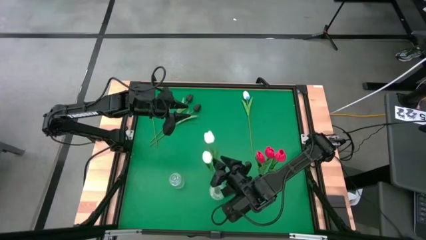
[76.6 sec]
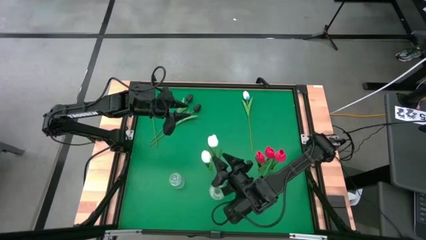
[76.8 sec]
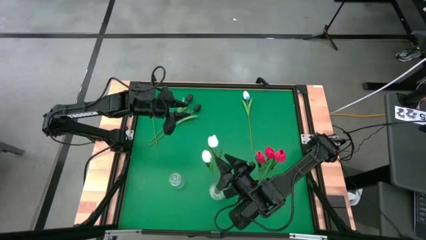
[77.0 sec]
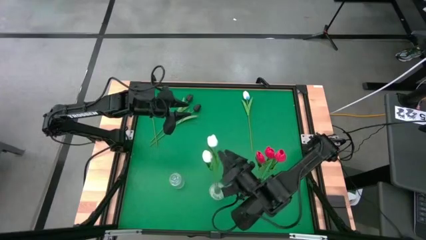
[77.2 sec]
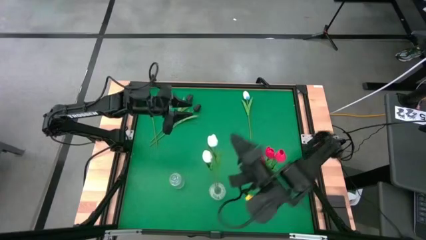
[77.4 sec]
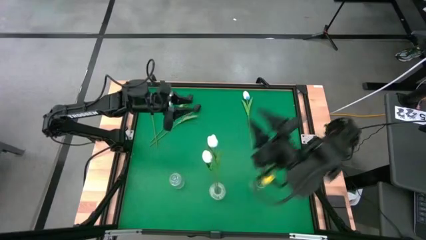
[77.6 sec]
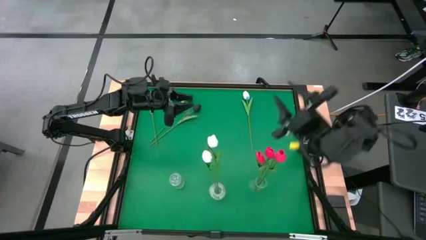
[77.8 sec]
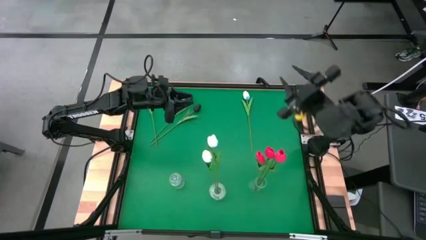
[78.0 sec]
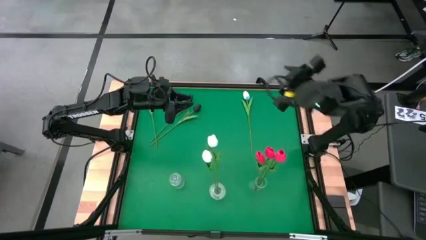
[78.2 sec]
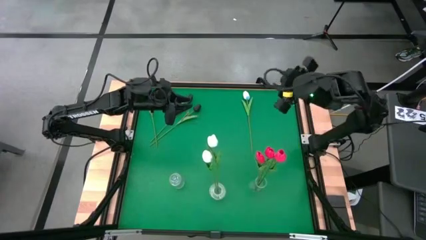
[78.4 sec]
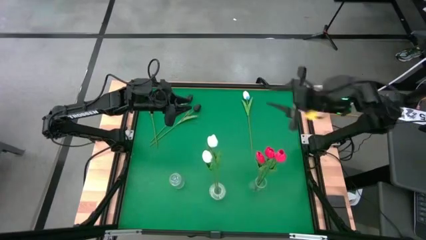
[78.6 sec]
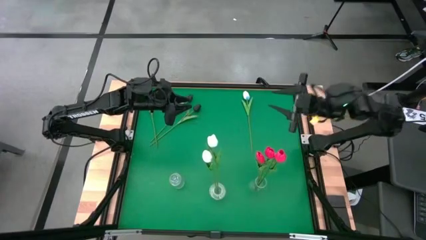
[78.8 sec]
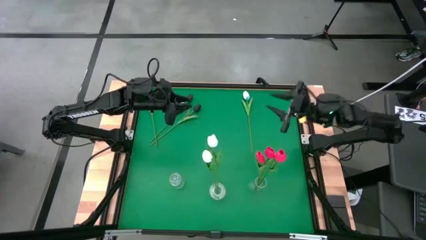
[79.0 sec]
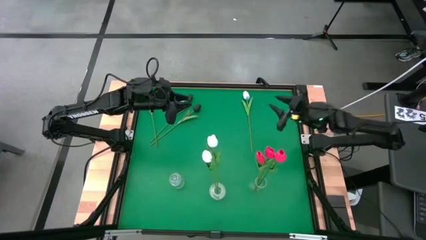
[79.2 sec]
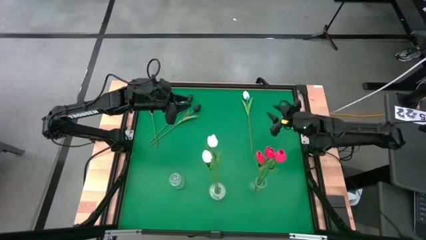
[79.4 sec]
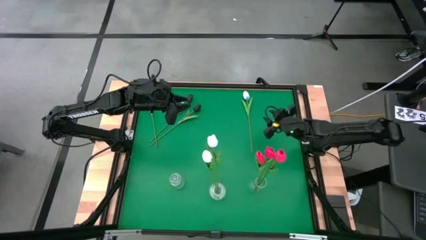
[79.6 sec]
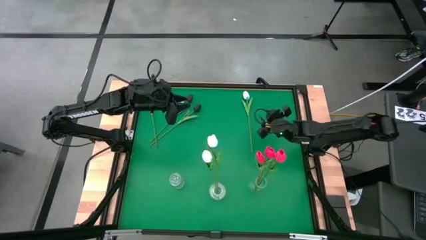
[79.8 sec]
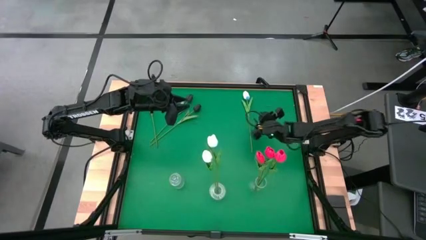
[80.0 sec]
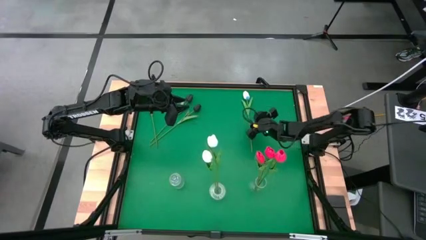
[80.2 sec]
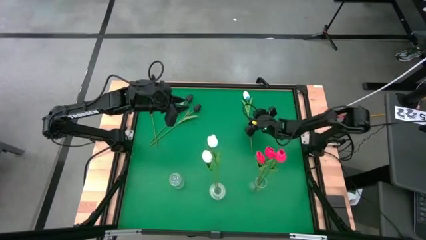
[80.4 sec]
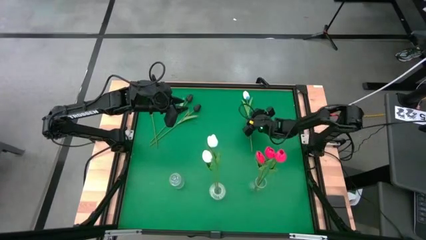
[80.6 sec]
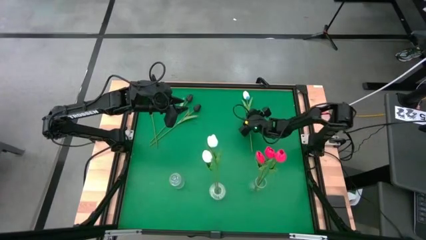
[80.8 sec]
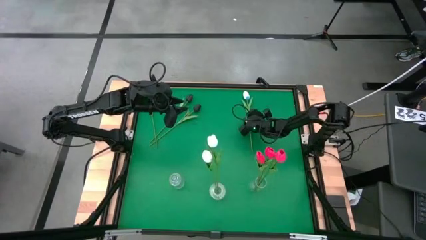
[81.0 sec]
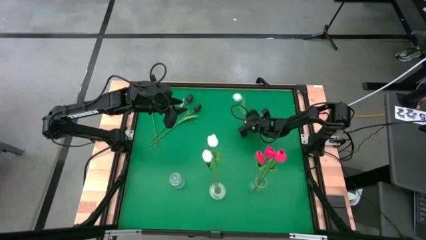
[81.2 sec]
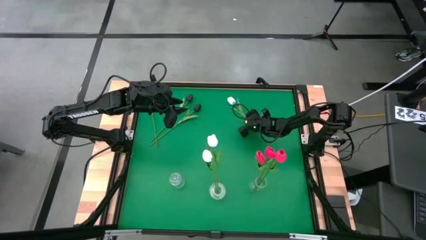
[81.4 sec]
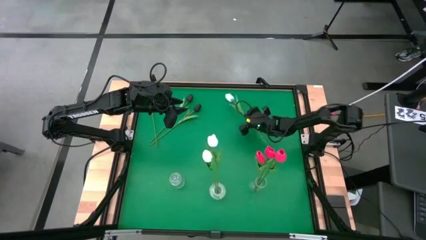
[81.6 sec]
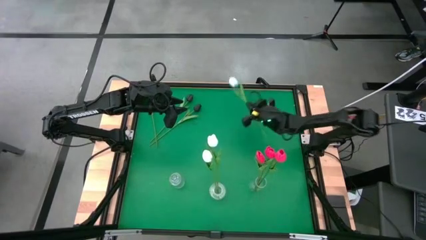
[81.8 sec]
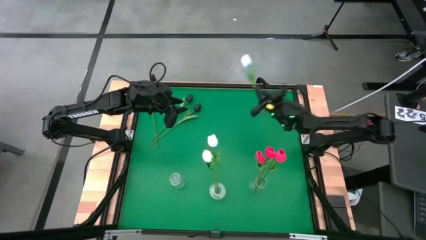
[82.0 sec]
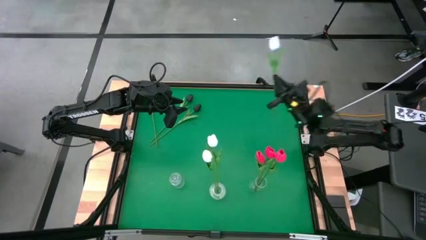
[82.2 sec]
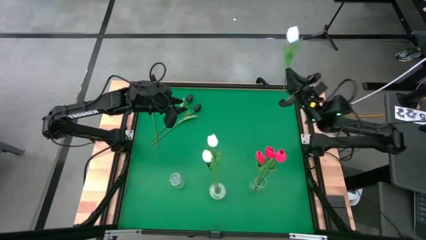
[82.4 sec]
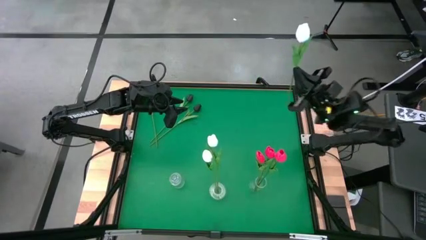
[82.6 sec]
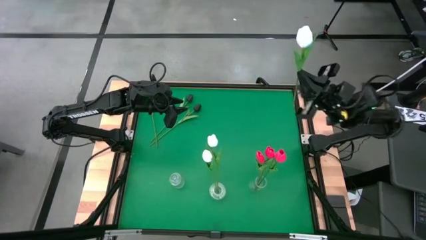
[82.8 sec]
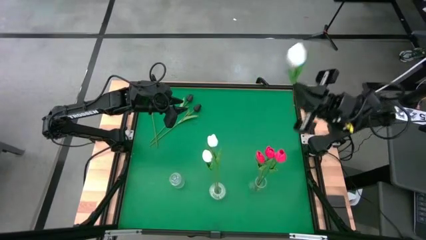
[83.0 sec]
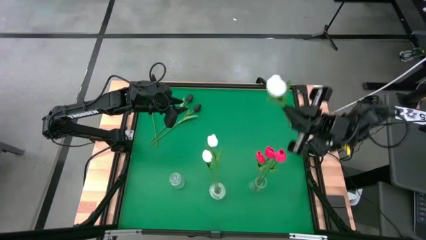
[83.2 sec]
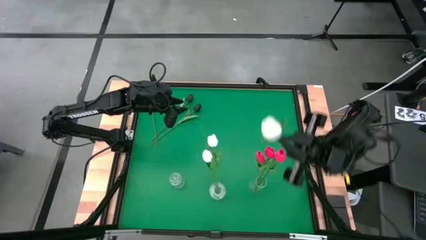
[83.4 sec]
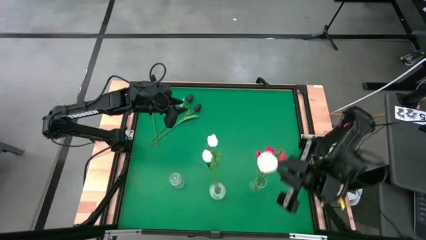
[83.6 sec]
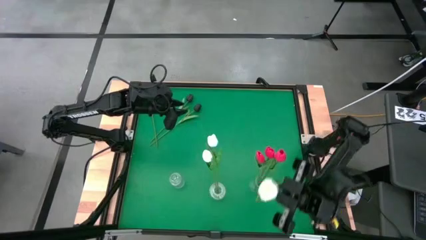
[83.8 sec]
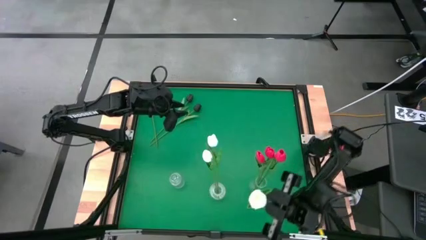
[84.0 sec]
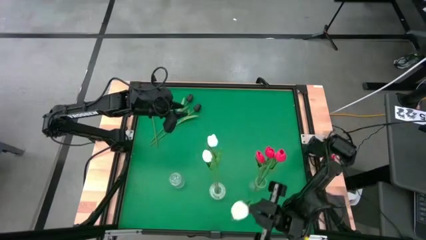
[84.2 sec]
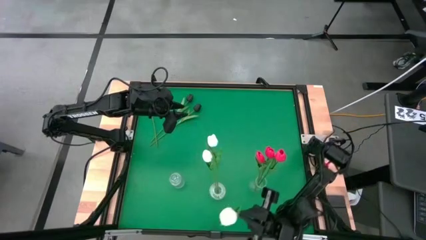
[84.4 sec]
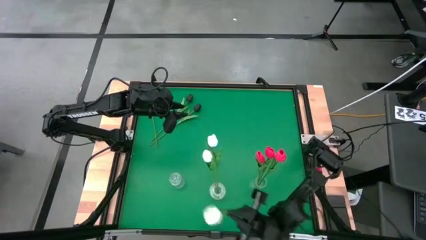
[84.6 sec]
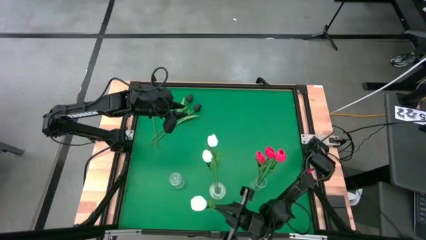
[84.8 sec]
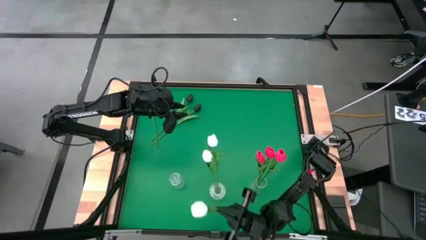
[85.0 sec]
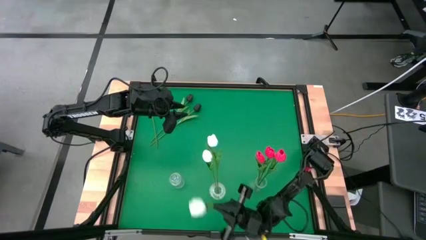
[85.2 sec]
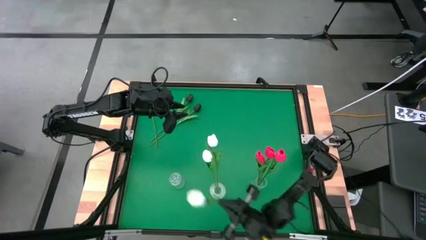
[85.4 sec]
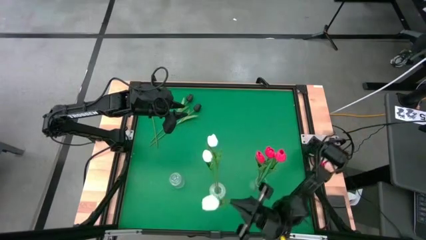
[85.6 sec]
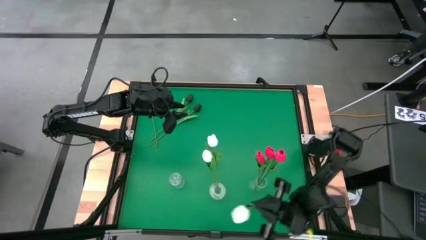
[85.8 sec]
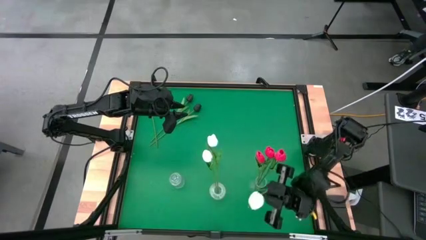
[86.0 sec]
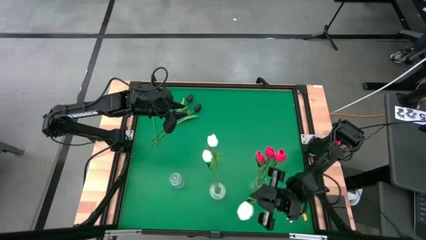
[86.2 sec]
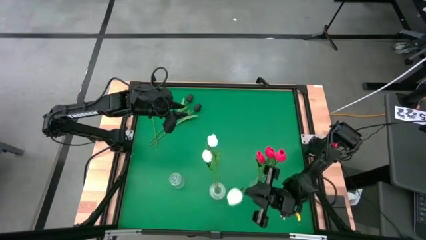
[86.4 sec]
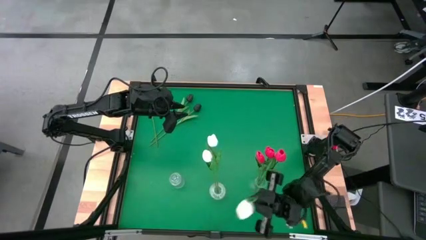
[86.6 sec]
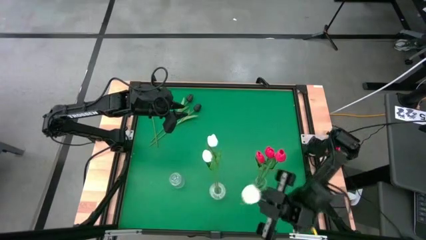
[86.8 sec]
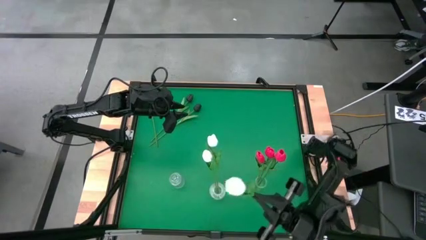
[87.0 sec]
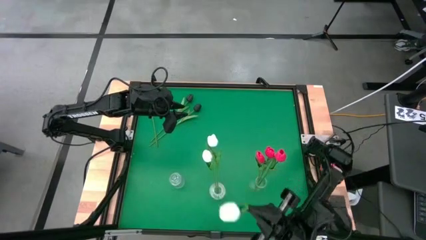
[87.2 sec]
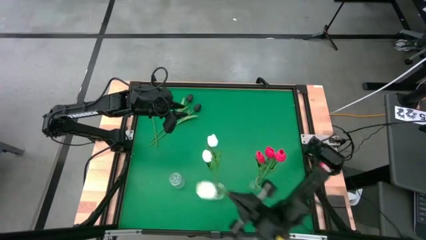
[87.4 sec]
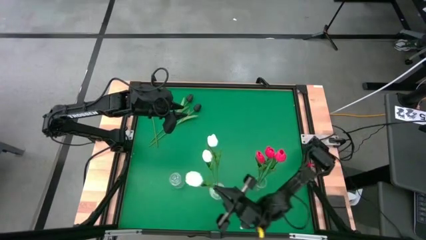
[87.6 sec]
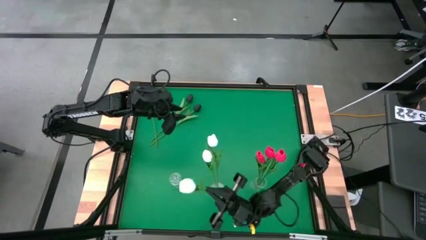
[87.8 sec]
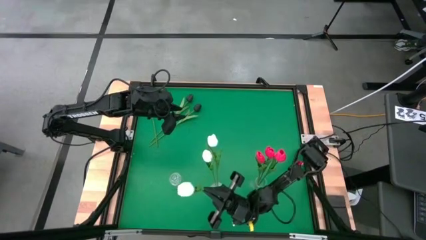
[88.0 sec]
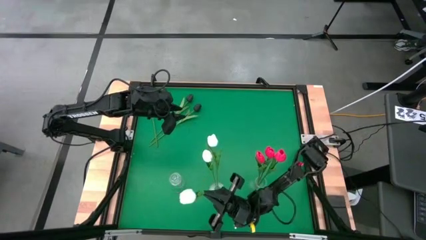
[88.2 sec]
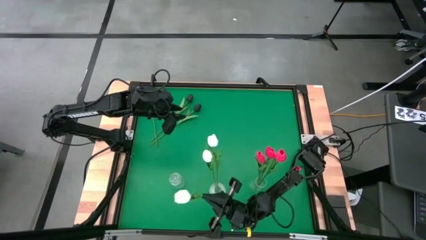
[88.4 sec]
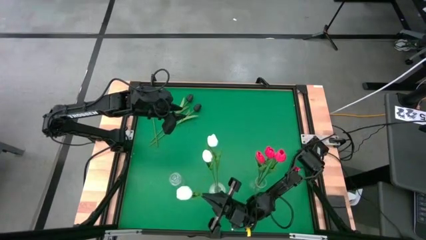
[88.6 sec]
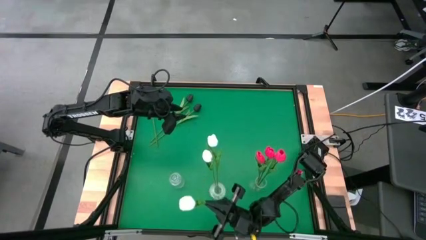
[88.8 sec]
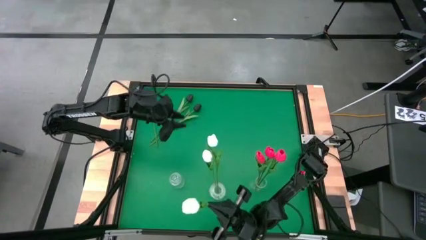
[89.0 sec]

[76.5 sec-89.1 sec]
Task: Sort flowers into vase by color
Put the white tulip into the middle transparent vase

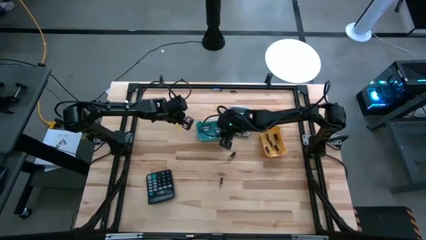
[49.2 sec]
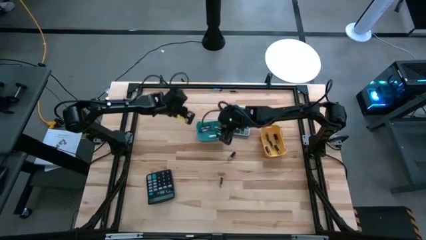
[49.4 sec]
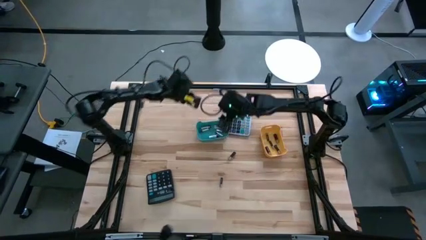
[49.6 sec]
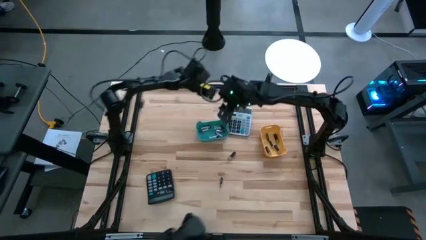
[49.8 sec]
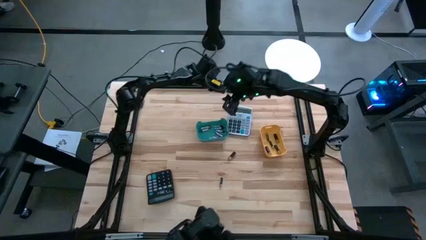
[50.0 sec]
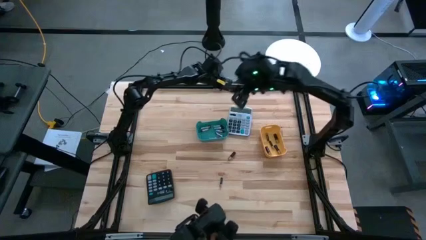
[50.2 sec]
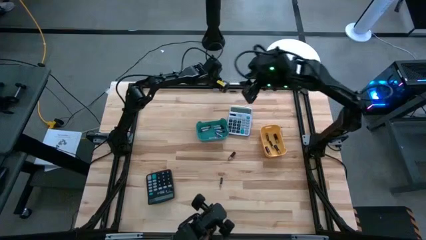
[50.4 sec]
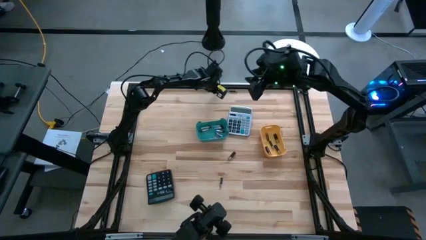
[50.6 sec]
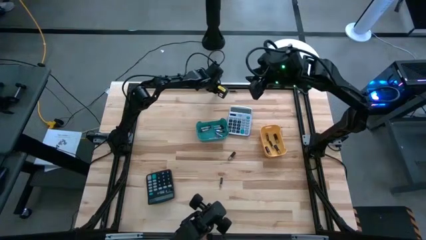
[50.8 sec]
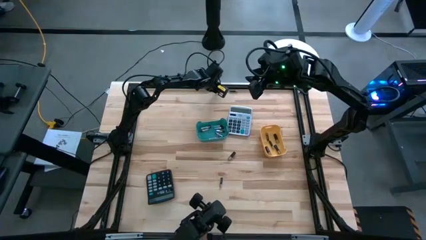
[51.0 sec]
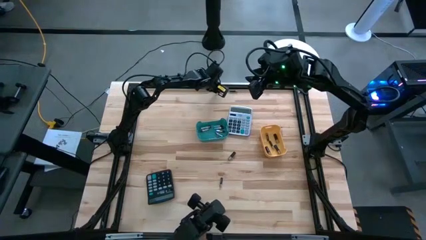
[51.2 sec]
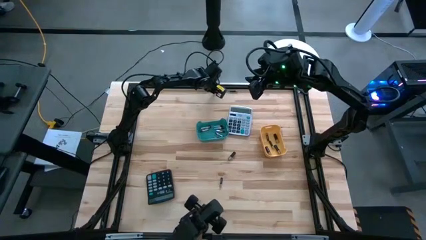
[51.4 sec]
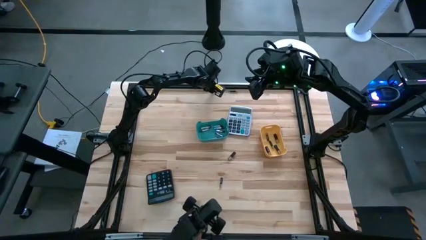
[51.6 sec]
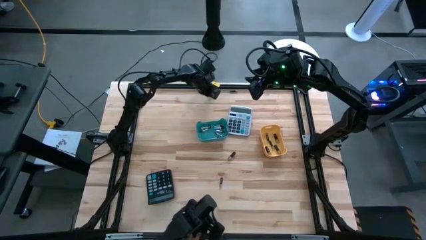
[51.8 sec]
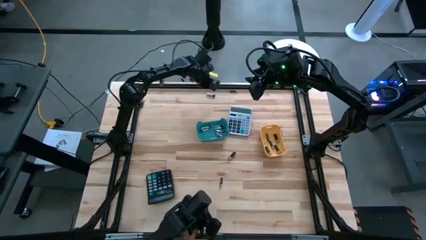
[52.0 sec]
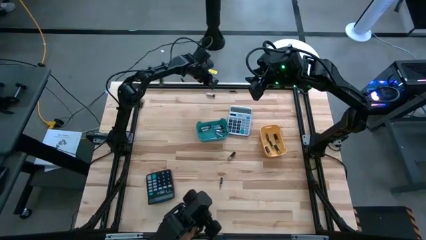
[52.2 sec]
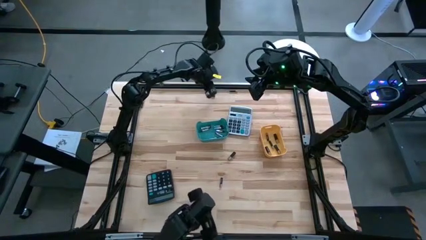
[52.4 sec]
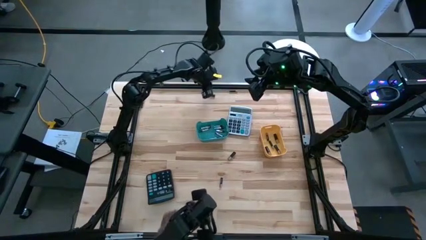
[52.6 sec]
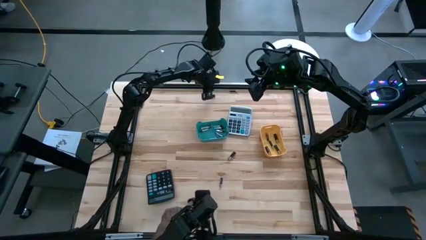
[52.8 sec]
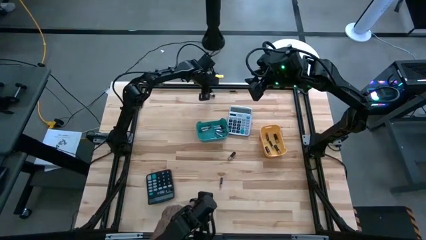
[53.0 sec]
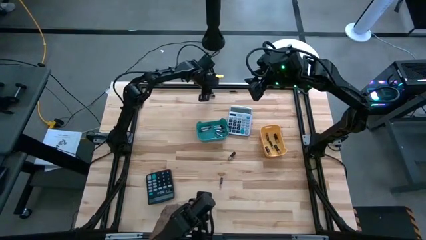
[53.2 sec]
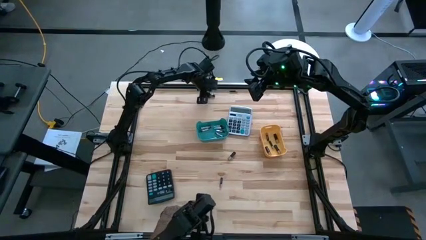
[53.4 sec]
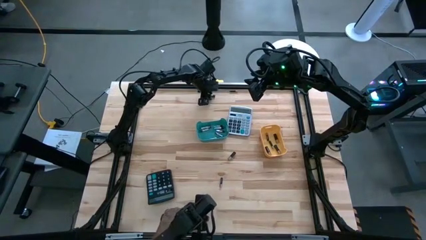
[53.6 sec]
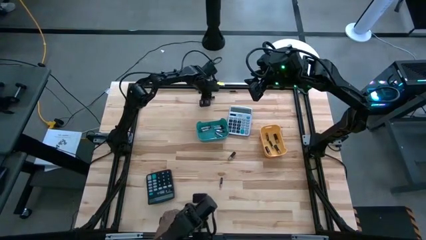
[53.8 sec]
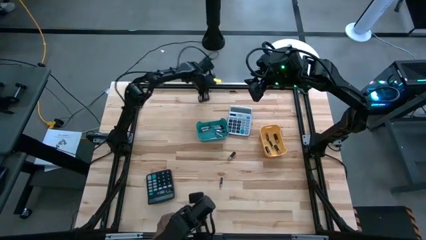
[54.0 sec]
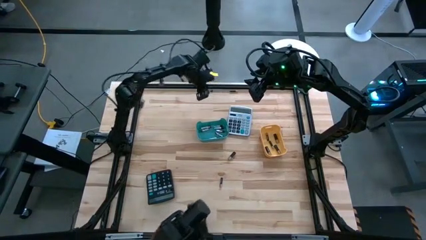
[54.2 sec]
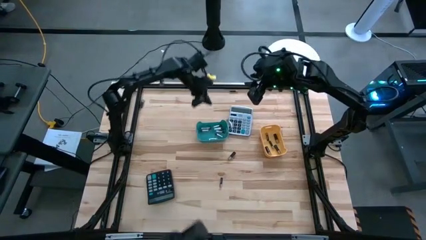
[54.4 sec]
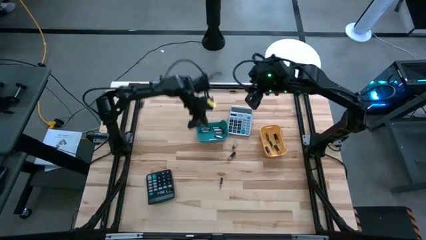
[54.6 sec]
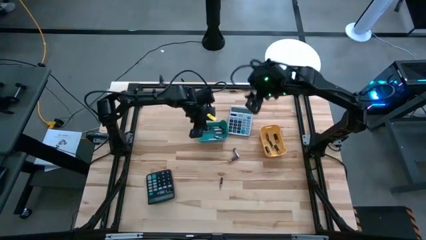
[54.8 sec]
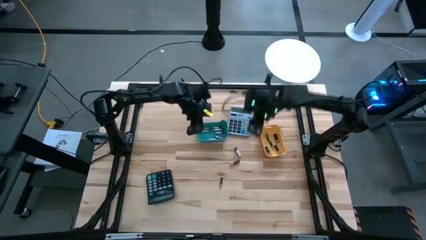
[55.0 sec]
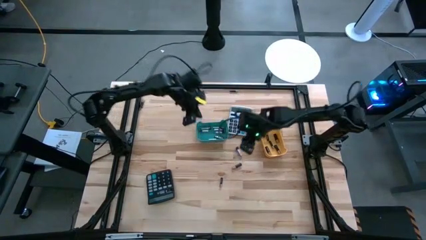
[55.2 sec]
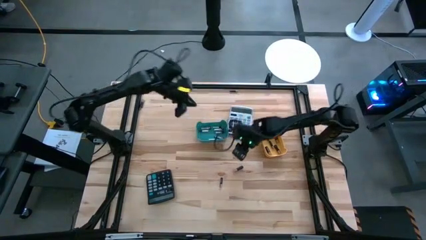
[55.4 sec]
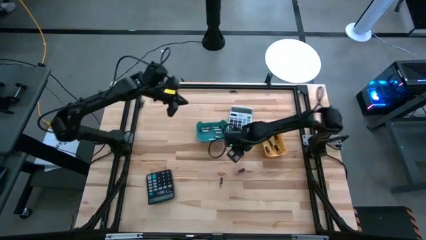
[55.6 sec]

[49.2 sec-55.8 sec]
Task: Sort batteries
Put the silver battery into the blue bin
